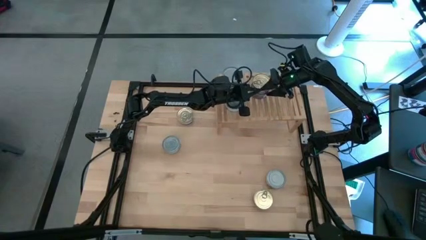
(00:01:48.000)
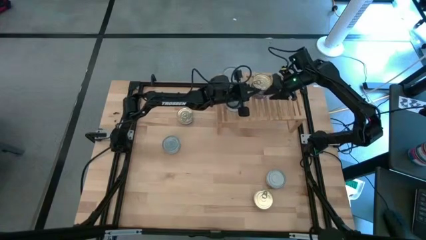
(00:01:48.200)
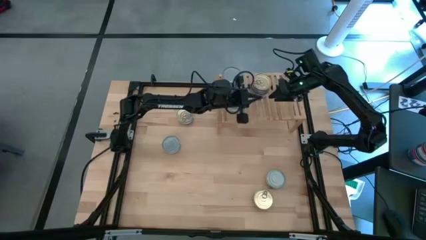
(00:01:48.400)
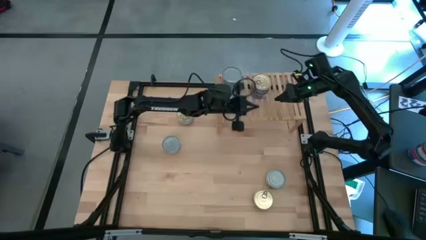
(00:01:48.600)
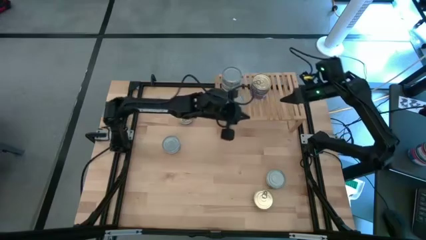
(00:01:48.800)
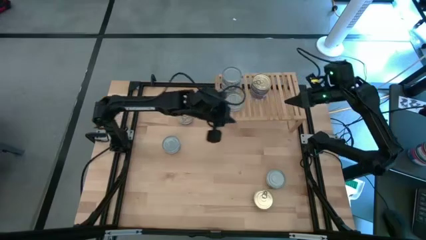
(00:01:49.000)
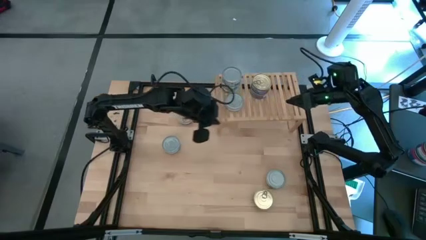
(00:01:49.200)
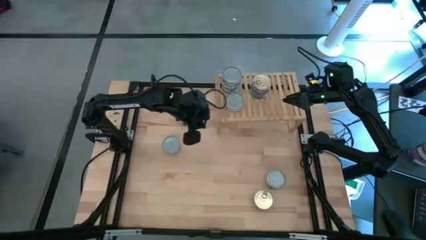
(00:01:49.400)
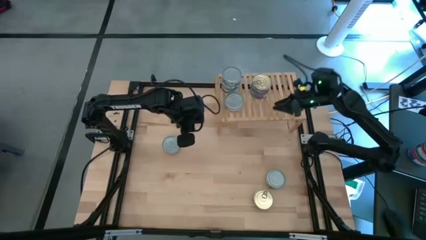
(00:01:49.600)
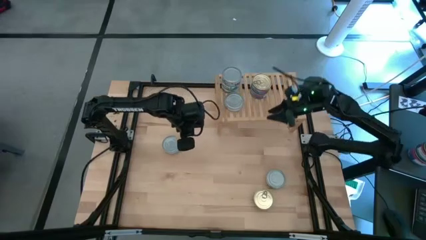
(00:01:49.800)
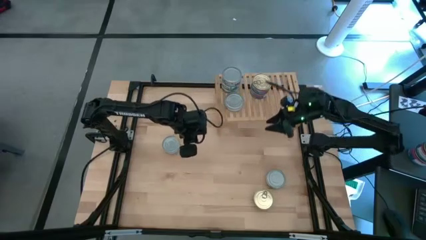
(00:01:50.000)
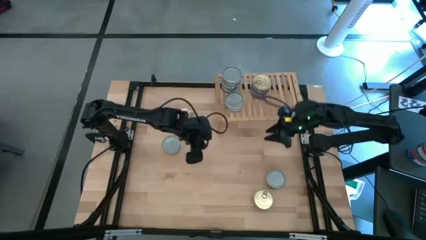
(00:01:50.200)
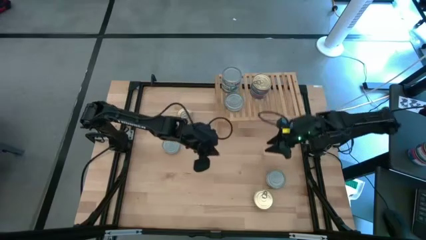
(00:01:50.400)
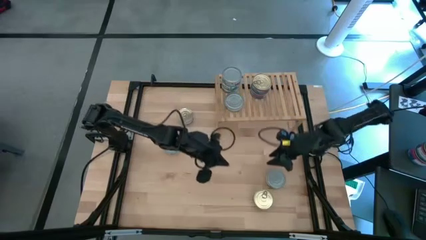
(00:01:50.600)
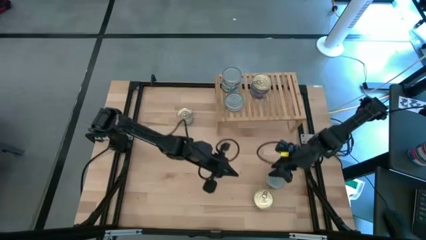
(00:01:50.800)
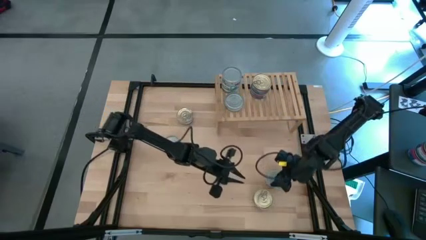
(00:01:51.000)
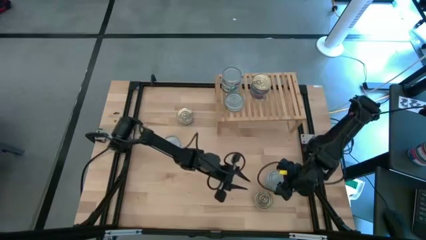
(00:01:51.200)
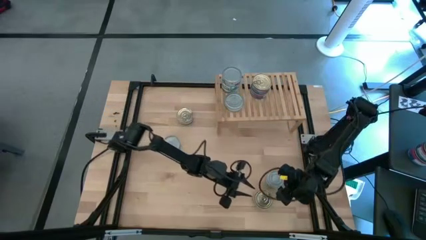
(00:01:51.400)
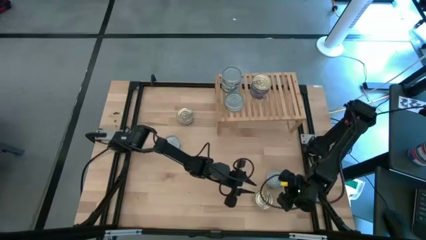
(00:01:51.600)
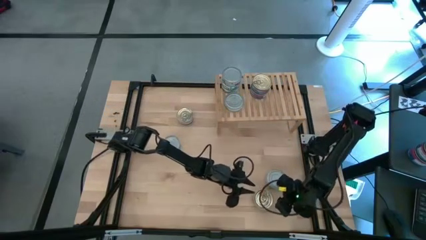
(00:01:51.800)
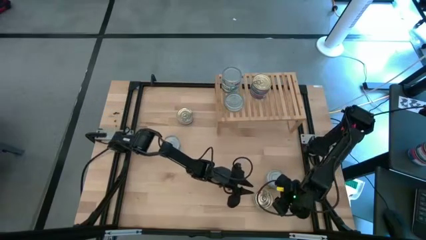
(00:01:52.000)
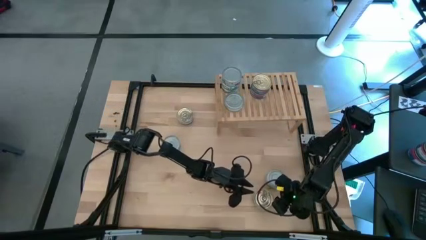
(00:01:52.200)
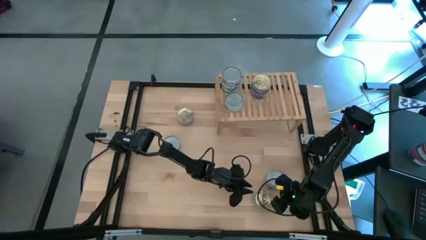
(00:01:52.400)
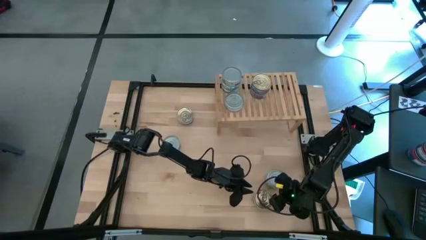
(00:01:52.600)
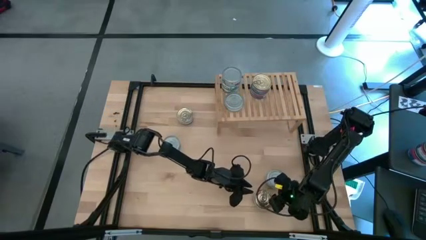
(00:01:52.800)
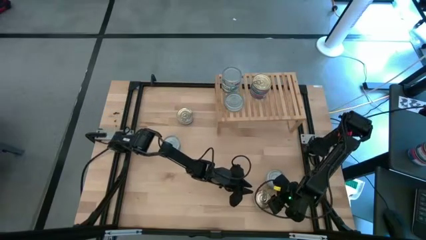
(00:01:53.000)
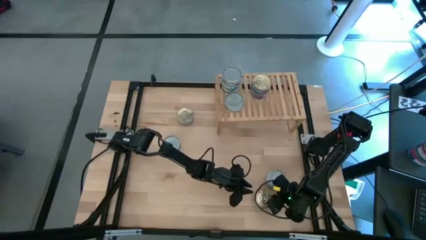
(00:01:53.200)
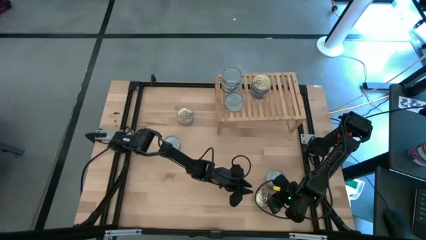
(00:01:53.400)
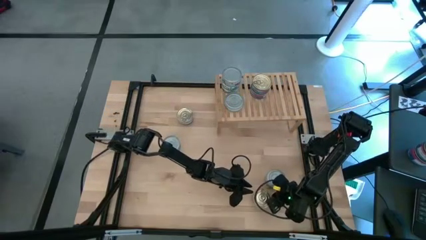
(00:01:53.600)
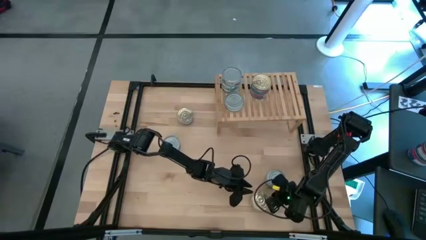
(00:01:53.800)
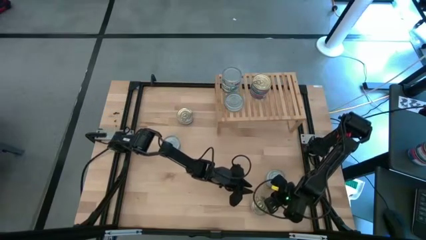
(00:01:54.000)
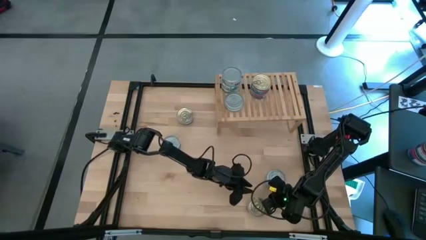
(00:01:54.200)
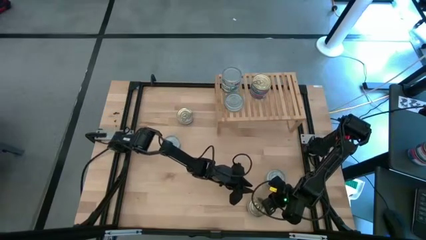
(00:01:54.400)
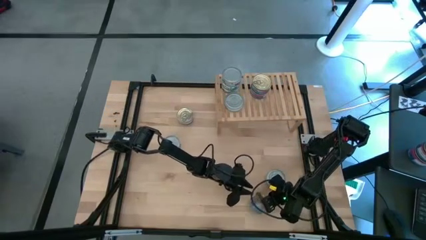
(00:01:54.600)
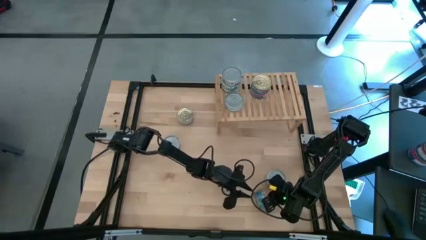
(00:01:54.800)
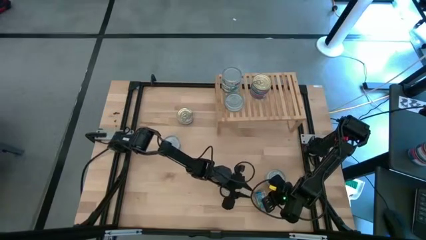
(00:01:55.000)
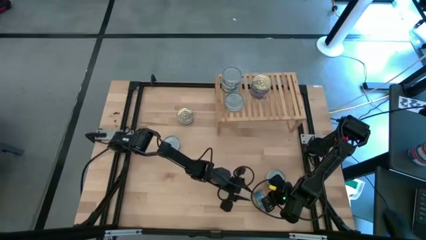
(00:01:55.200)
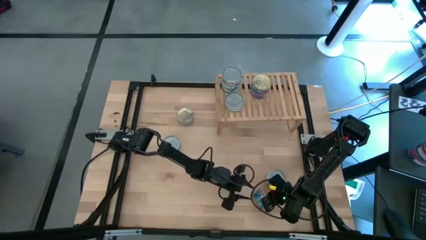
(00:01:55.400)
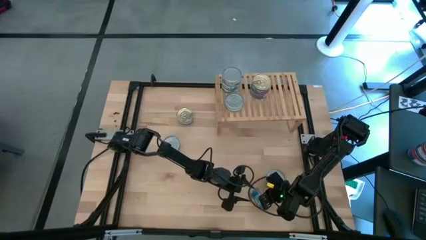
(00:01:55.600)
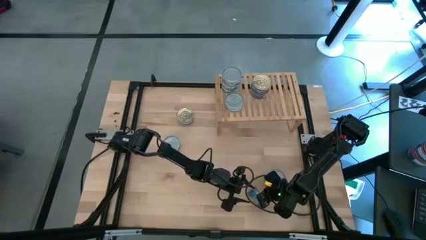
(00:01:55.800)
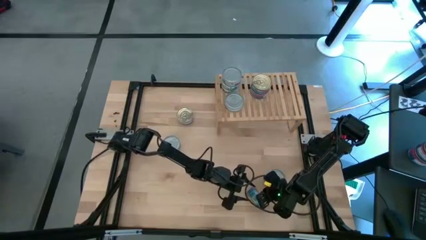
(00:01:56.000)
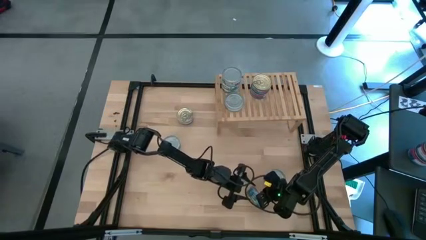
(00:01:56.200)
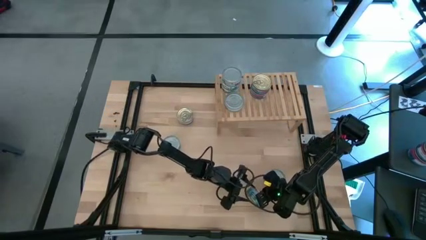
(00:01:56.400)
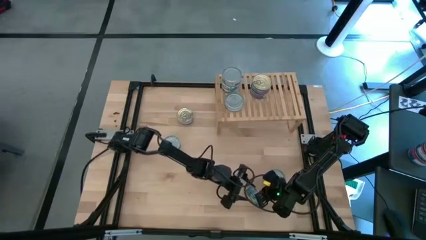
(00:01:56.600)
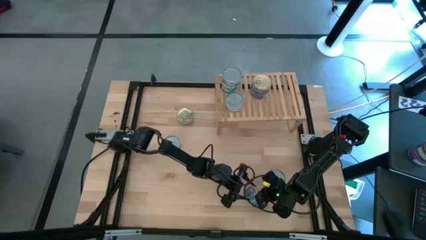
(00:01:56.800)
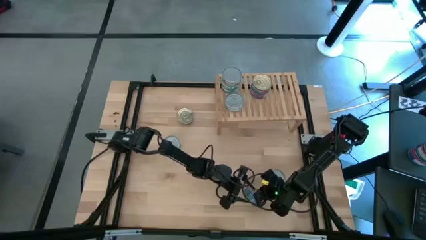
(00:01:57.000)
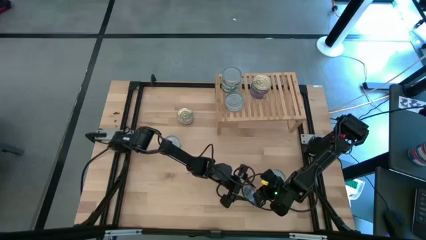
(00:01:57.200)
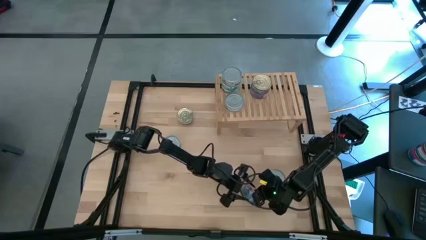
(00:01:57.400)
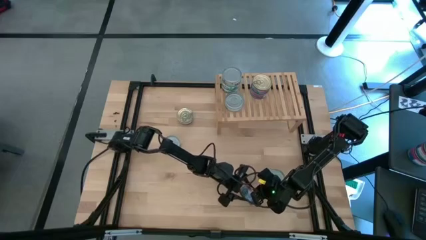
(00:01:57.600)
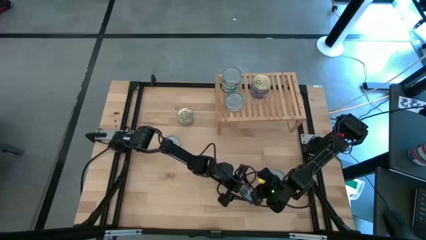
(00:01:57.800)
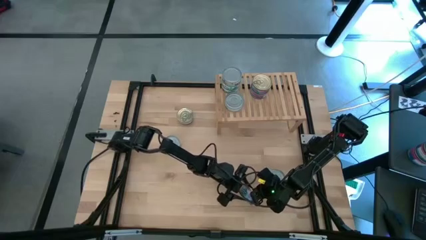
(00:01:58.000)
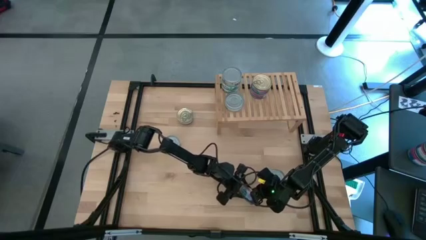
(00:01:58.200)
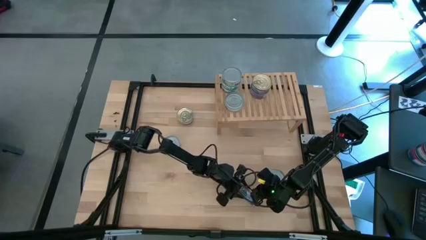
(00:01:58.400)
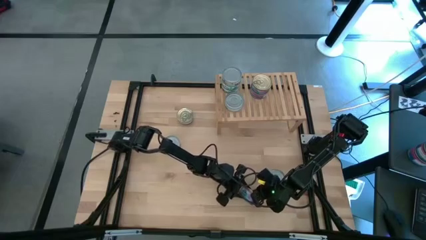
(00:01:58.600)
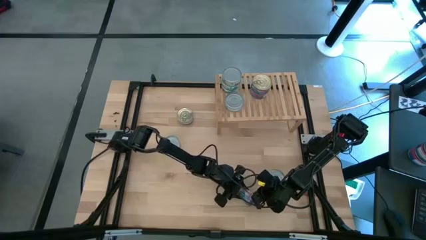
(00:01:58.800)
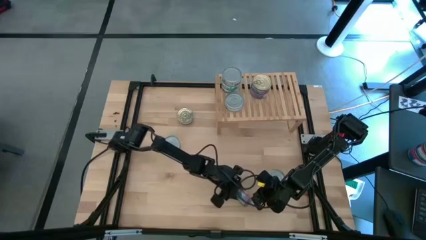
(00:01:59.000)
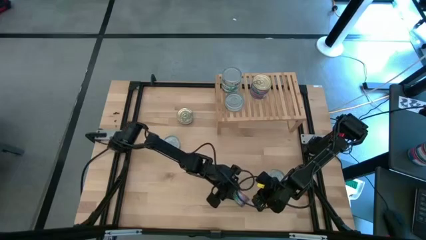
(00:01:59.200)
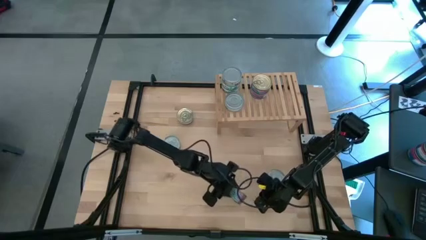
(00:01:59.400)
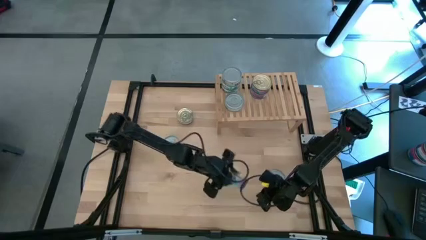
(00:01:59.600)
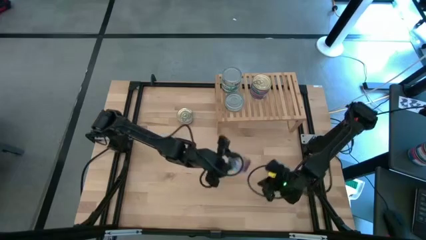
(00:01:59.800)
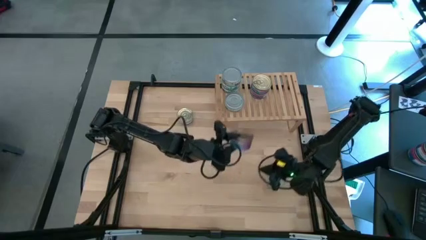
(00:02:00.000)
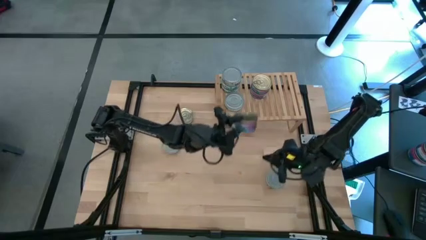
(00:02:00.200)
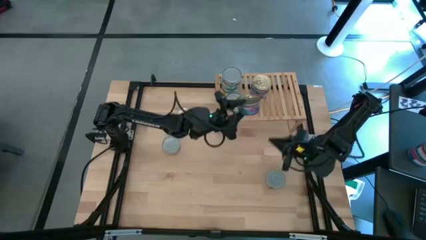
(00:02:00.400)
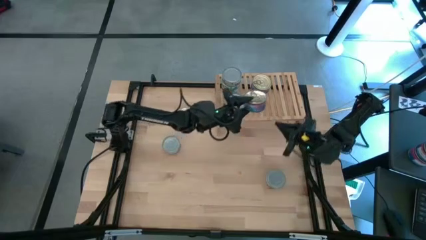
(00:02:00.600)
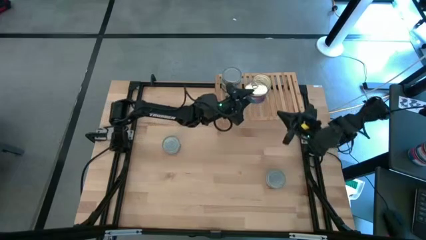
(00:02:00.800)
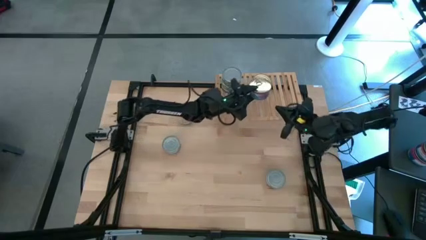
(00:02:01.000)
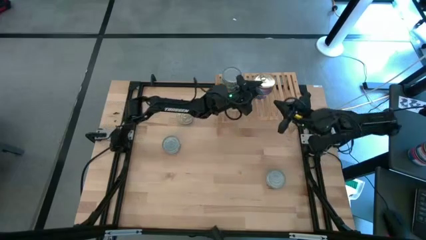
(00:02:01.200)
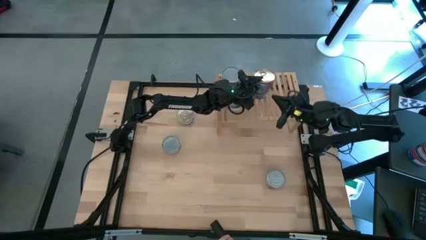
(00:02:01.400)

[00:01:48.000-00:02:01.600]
Task: Stack canned seafood by type on shelf
Stack the blue pink tuna can on top of the blue pink tuna cans on the shelf

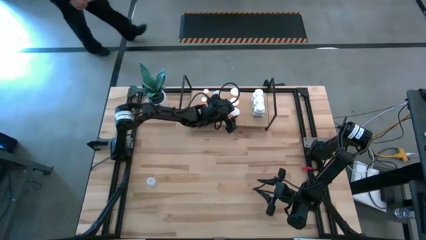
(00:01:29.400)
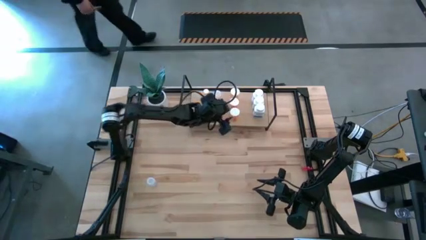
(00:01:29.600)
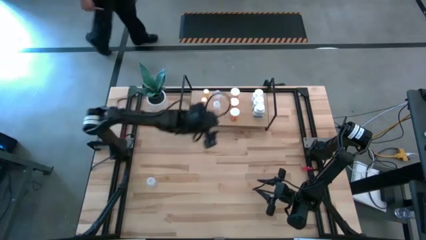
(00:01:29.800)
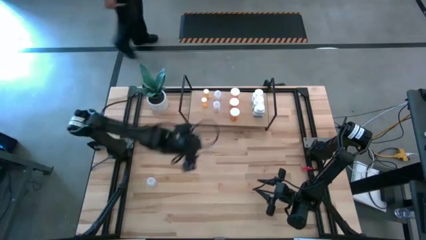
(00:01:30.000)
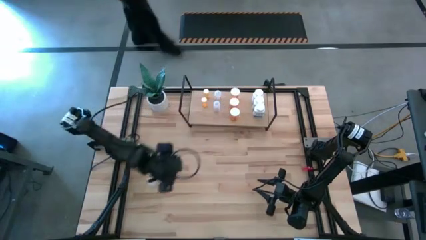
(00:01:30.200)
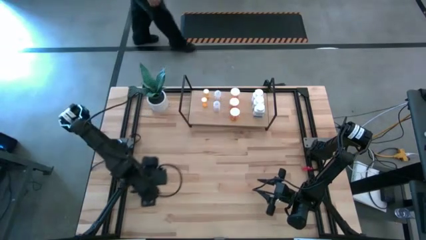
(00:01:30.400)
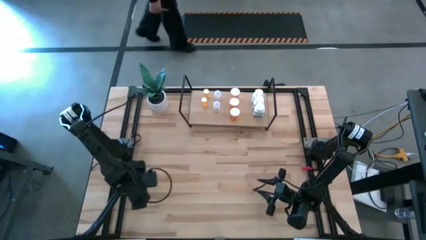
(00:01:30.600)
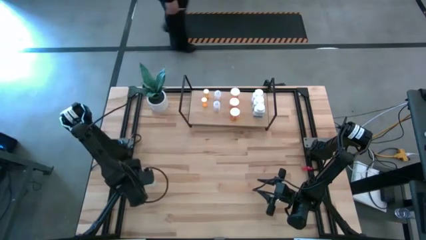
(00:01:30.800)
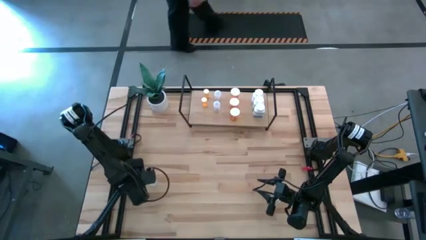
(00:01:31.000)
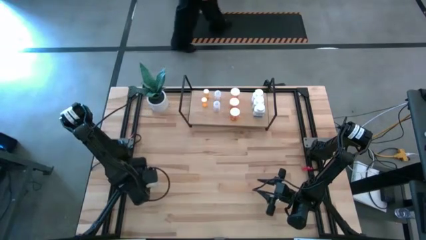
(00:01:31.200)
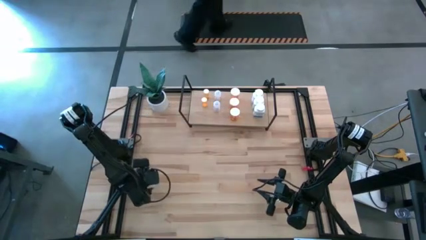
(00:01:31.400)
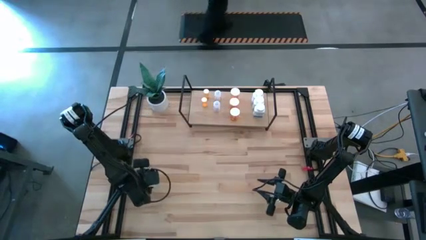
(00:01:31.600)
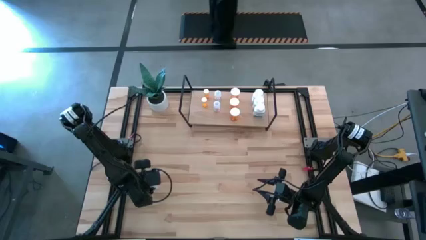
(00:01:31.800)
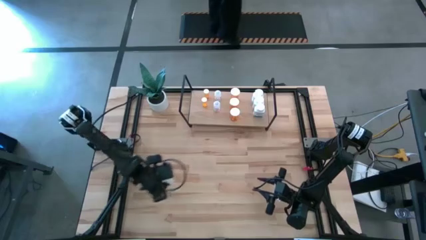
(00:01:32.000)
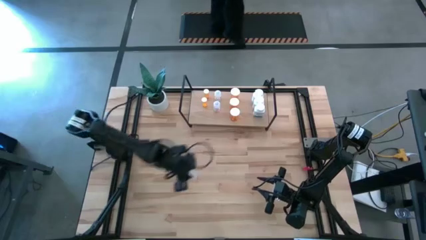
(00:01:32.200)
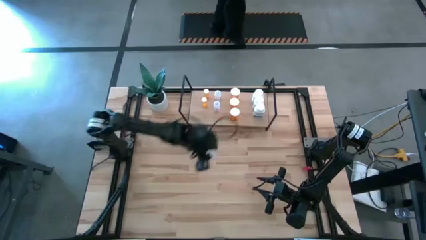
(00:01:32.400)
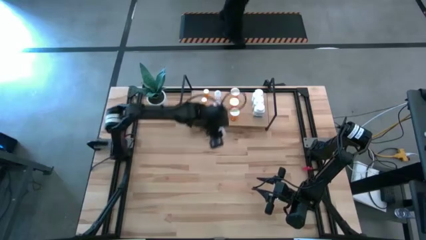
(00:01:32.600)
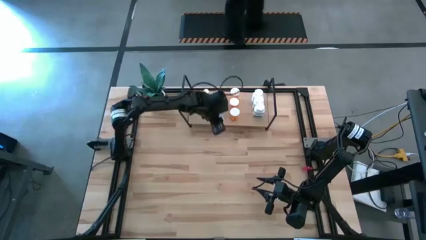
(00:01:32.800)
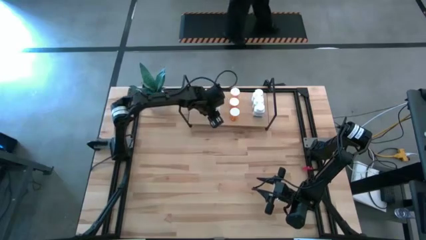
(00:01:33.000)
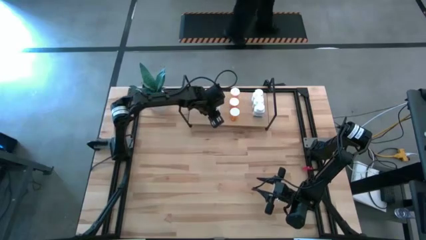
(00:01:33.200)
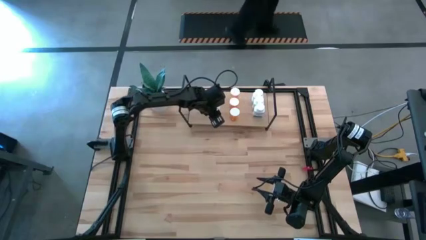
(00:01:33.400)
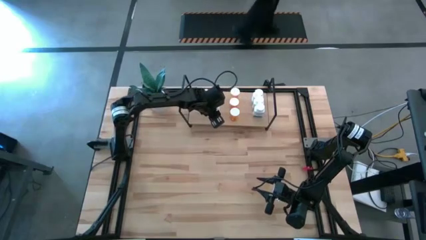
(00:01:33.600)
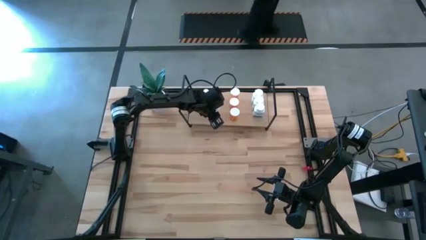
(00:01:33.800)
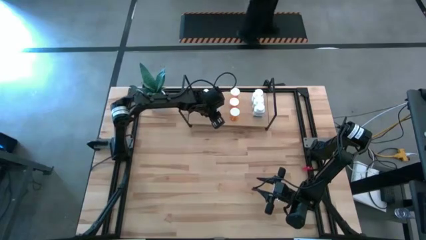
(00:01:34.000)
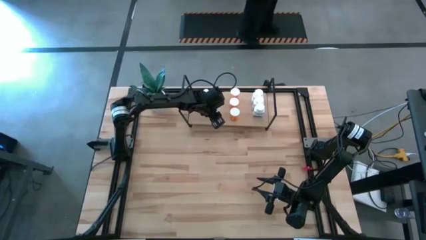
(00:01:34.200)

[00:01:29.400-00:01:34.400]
Task: Pick and place medicine bottles onto shelf by color
Put the transparent medicine bottle on the shelf aligned with the other transparent medicine bottles
